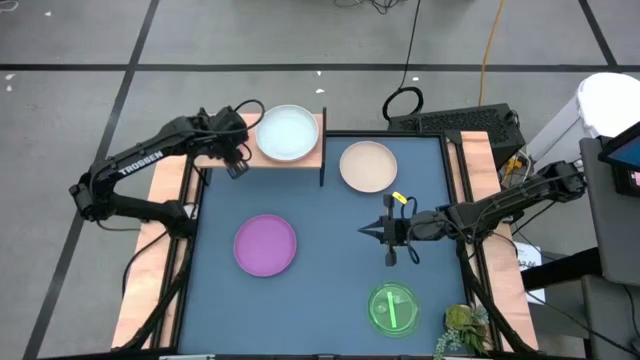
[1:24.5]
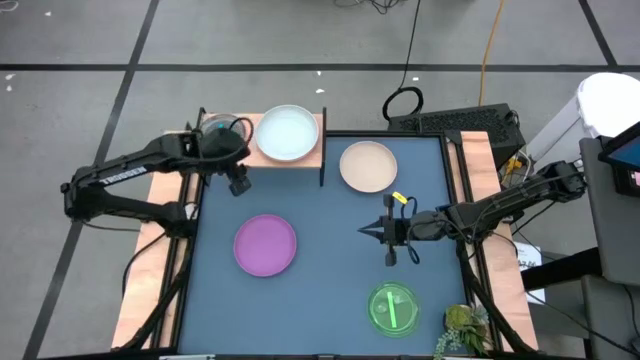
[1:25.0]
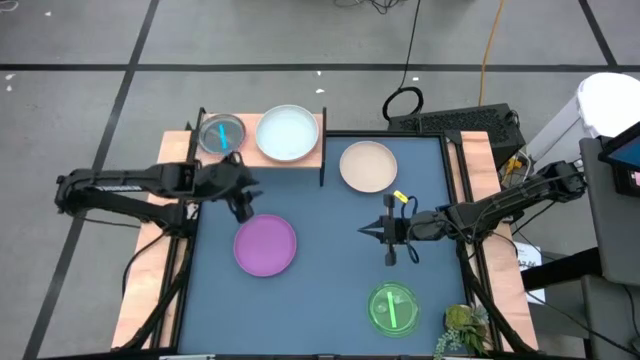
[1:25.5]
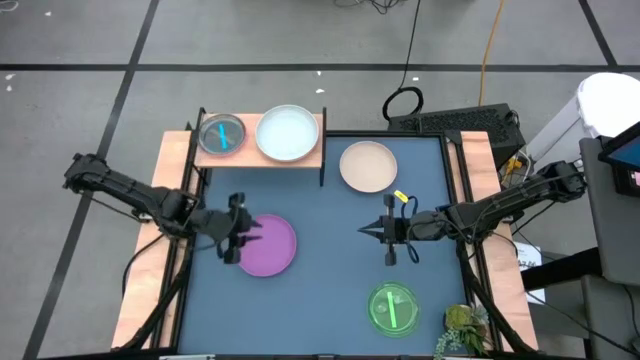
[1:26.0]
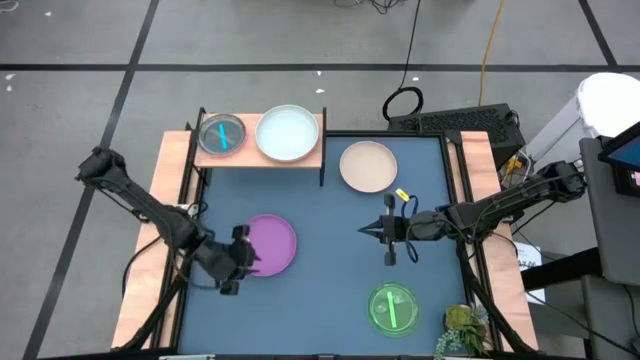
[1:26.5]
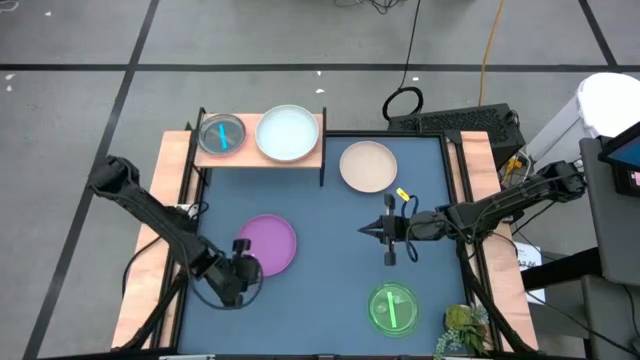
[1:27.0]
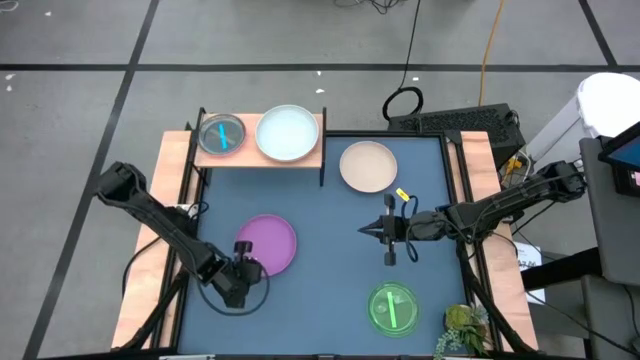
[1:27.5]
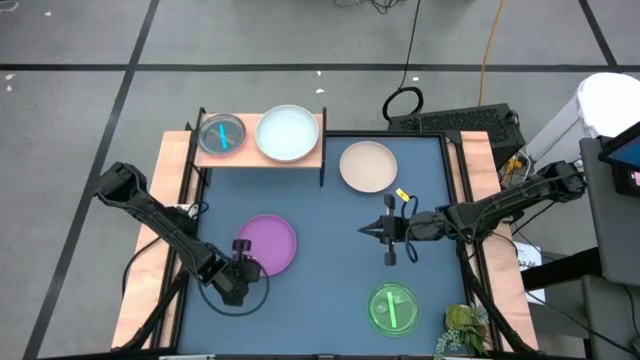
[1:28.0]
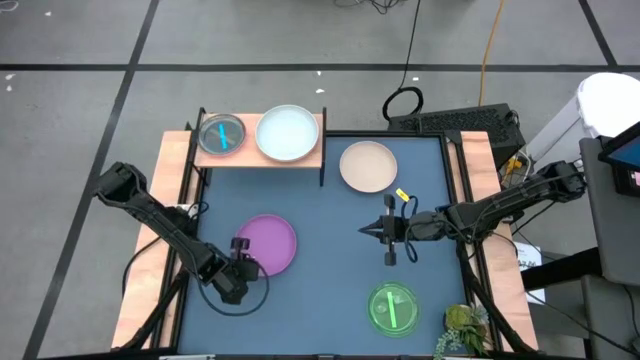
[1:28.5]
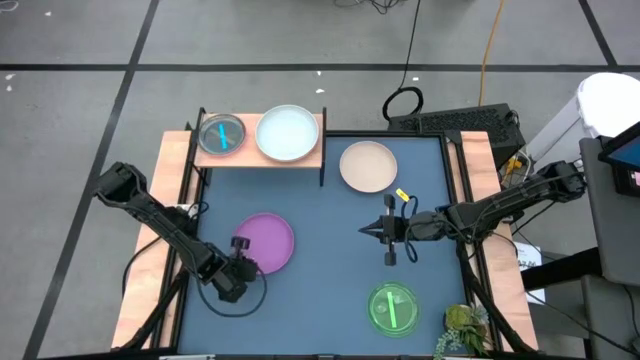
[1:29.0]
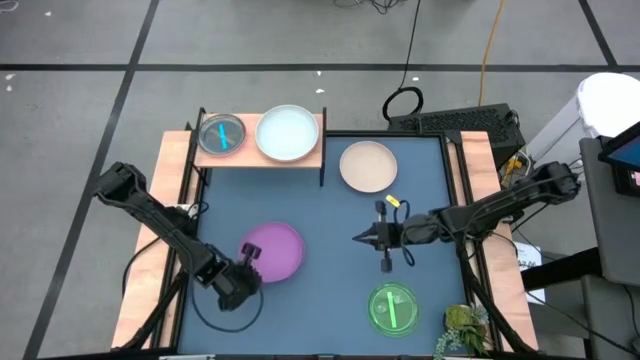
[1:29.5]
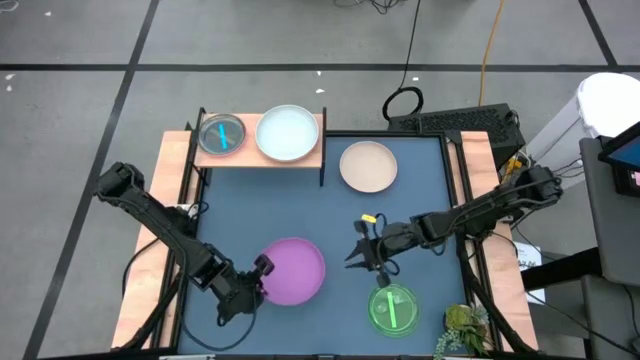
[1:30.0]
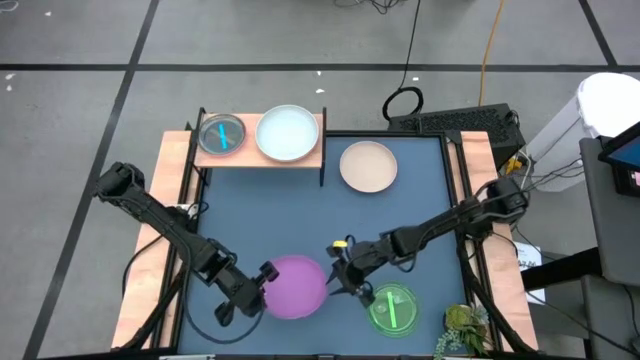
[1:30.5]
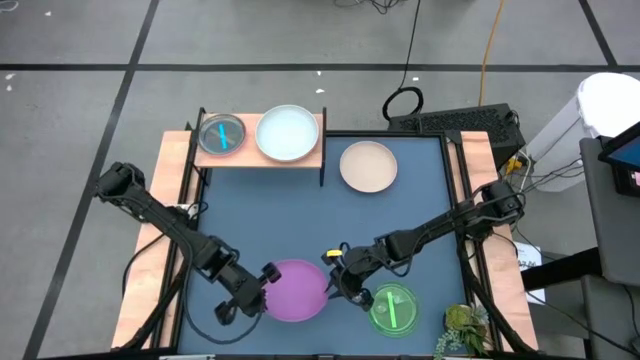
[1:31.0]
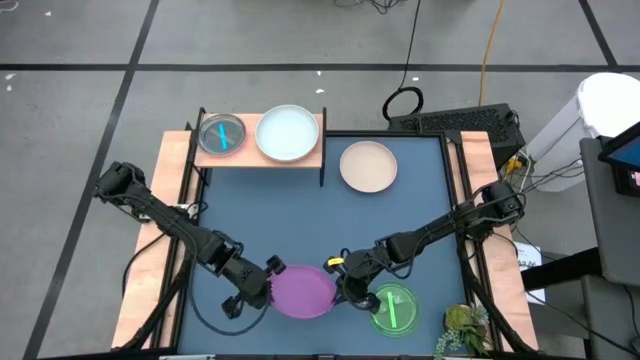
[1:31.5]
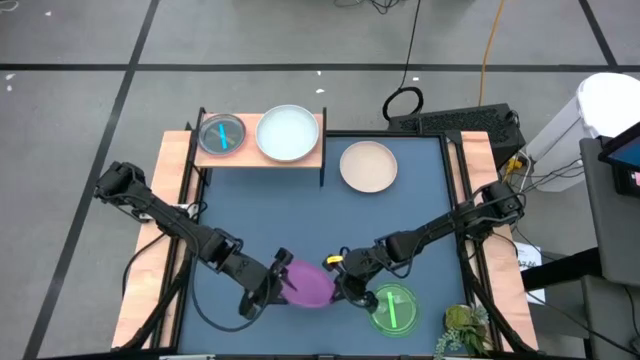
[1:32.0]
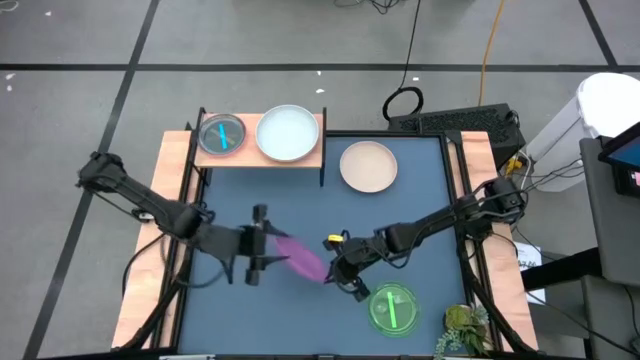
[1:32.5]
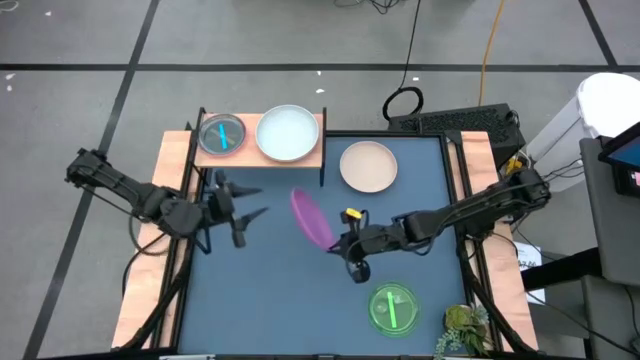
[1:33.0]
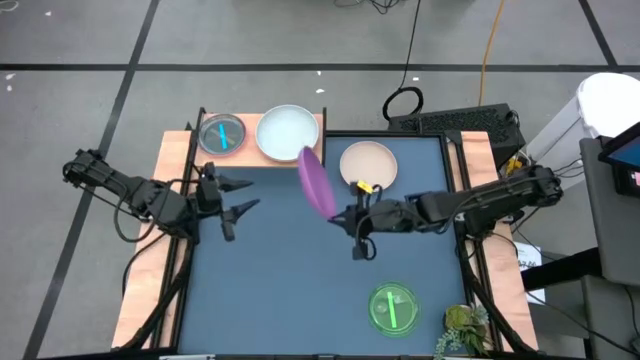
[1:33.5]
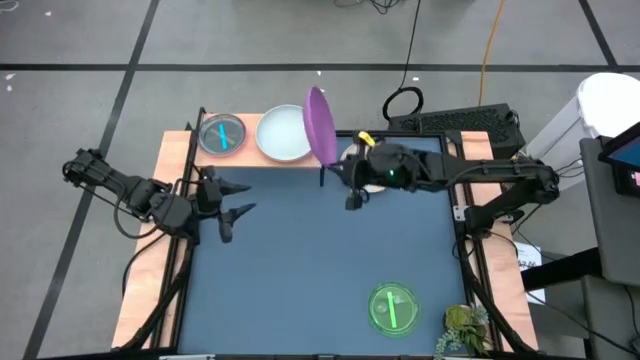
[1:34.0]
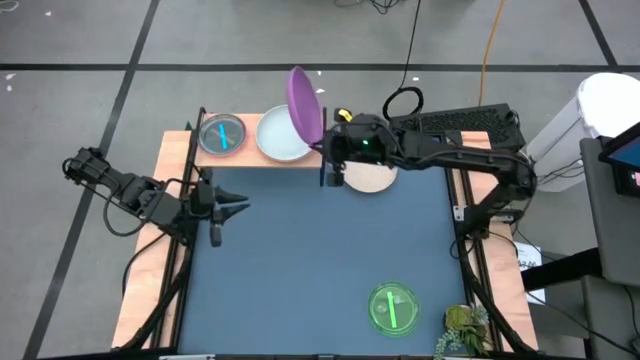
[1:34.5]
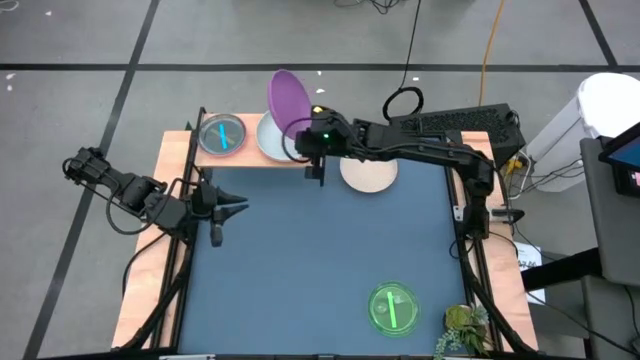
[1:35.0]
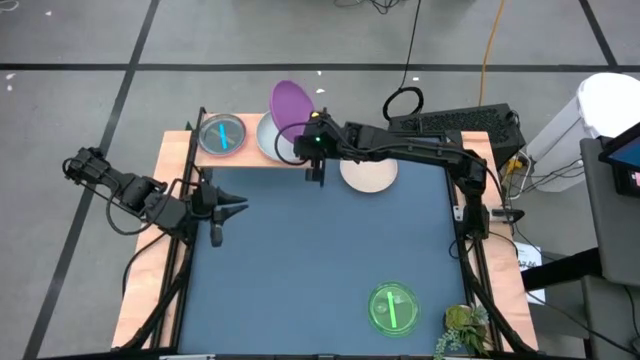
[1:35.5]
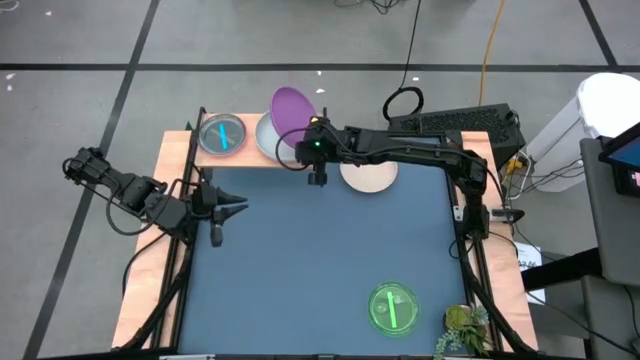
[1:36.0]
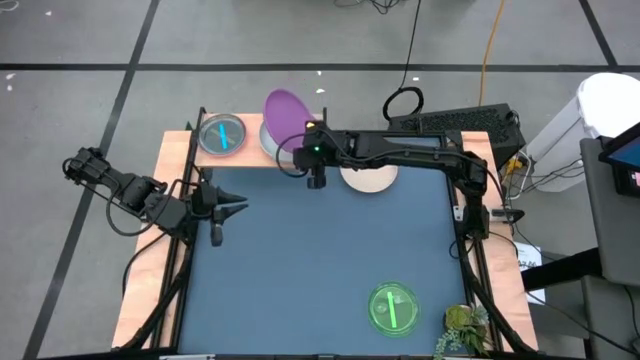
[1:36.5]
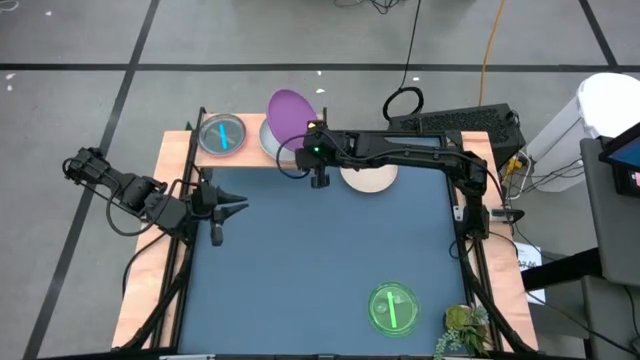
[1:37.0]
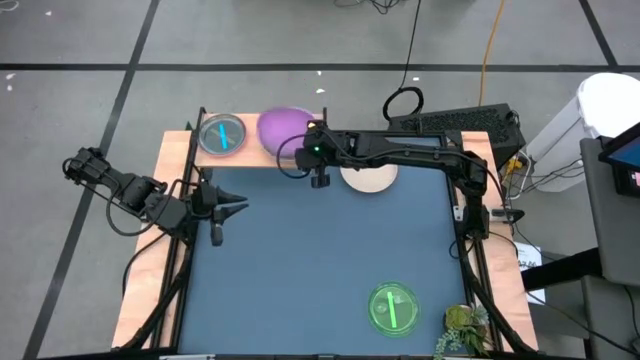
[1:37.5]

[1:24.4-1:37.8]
Task: Place and stack plates onto a shelf
Stack the dark pink plate on top of the gray plate on the shelf

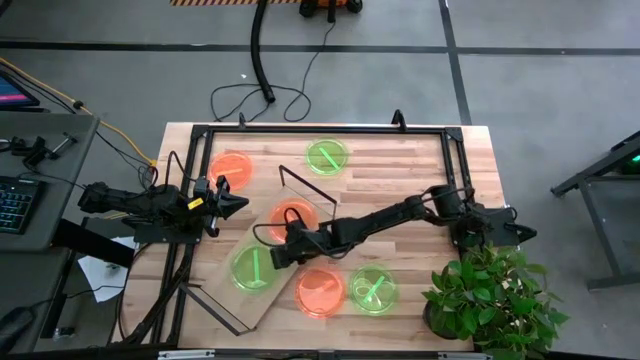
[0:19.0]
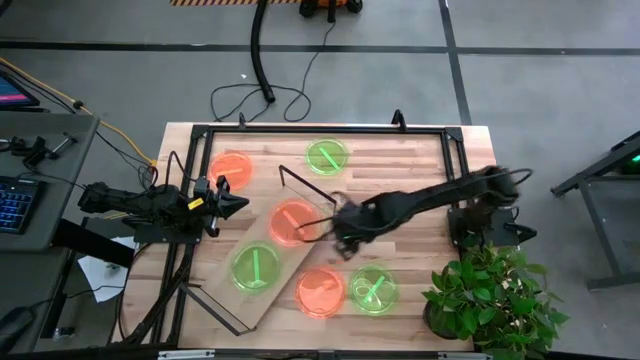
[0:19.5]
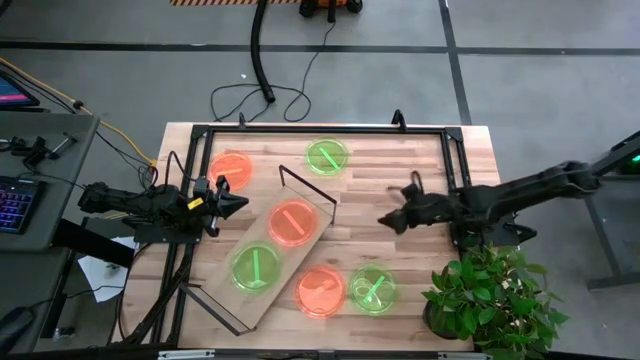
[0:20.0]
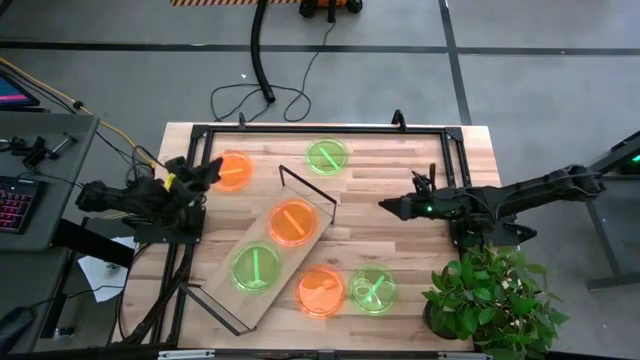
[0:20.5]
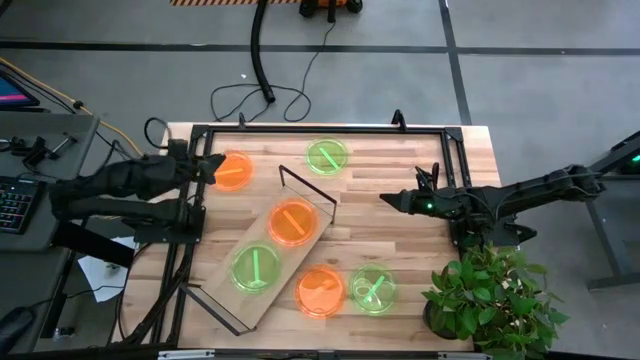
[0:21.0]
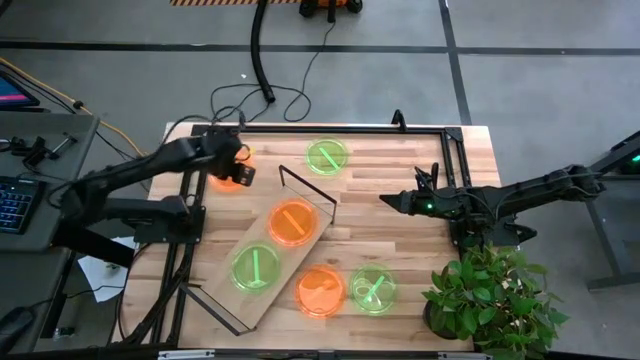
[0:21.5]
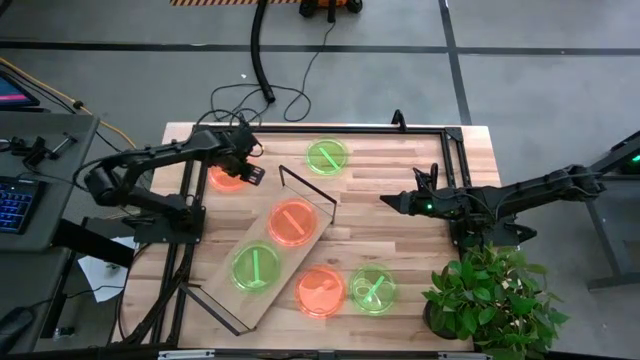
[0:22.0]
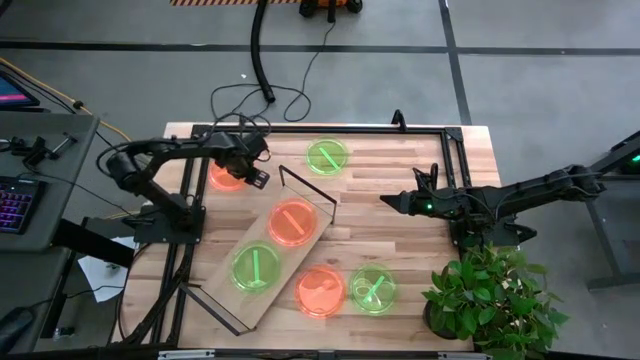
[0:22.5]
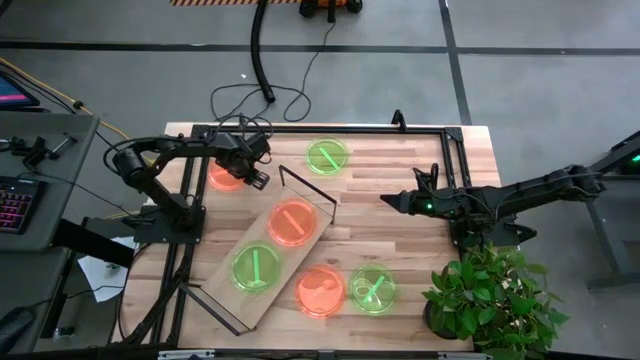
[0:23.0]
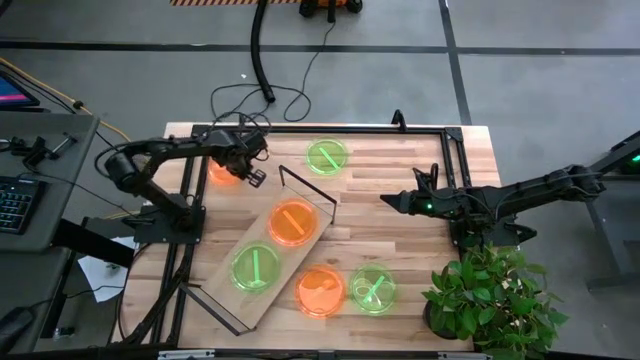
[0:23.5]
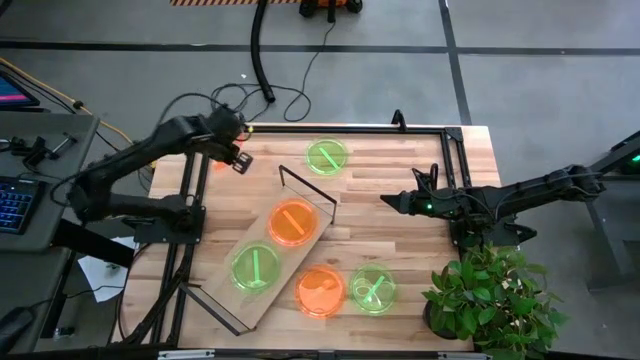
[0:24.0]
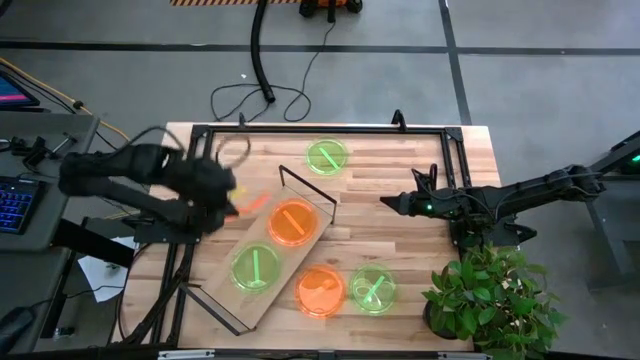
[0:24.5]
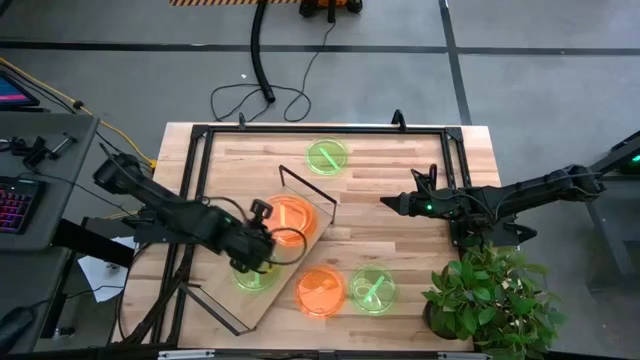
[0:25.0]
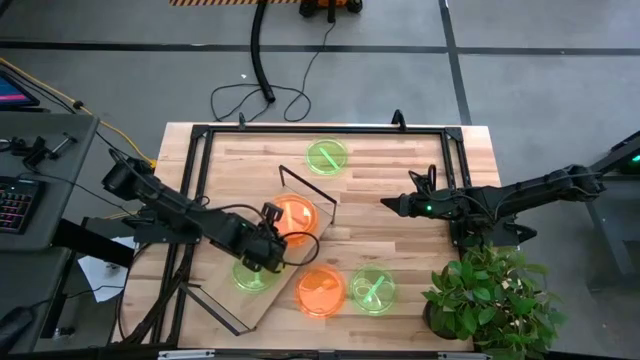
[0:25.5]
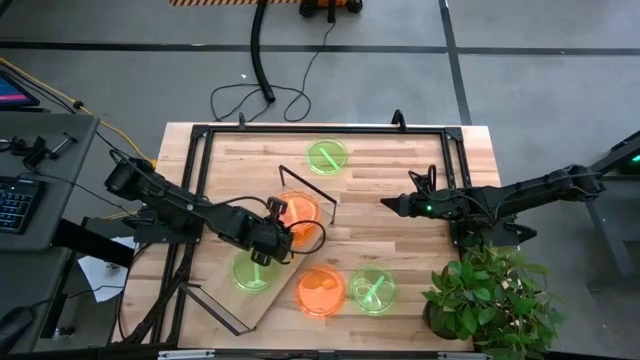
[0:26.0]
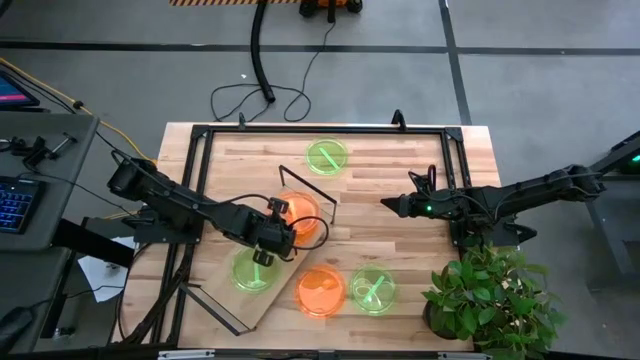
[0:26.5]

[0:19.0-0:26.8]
Task: Place and stack plates onto a shelf
Stack the top orange plate on top of the other orange plate on the shelf

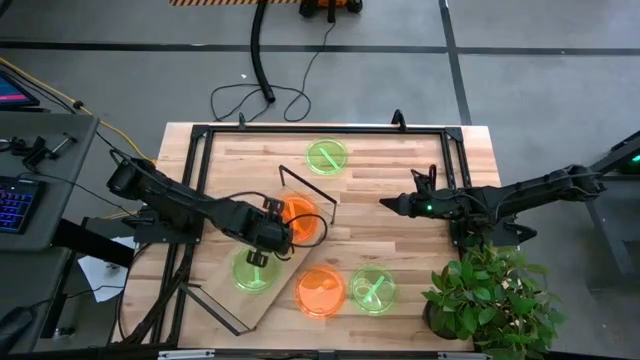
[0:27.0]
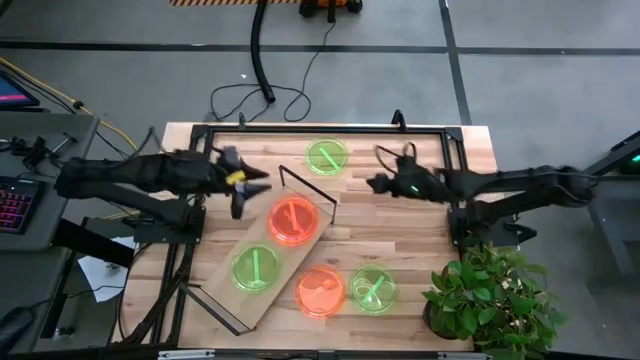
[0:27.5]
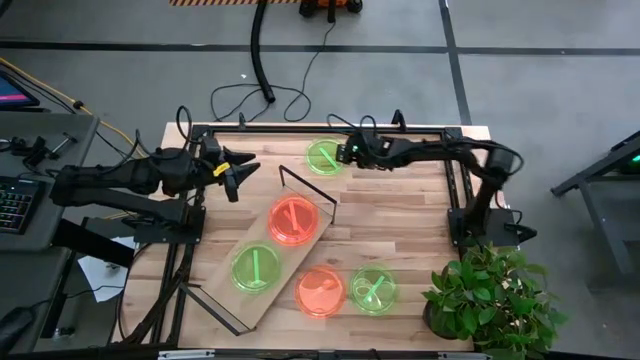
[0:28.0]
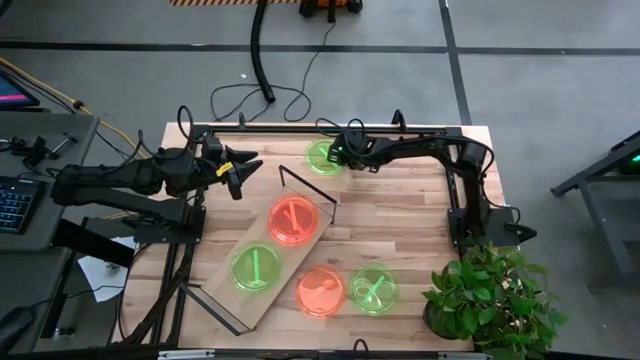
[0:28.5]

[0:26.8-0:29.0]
Stack the top green plate on top of the other green plate on the shelf
